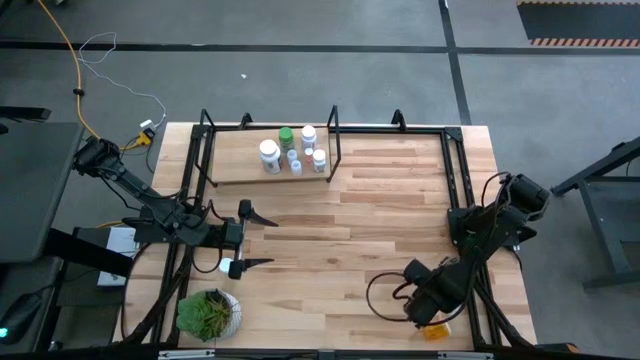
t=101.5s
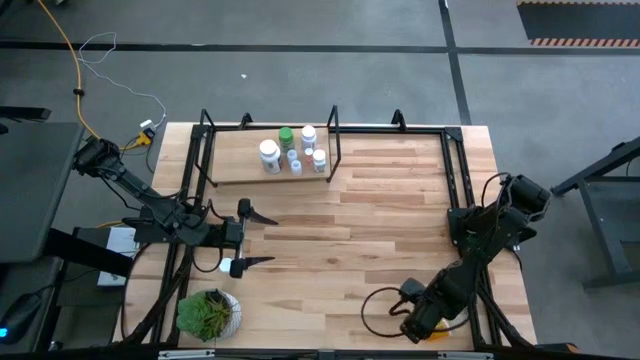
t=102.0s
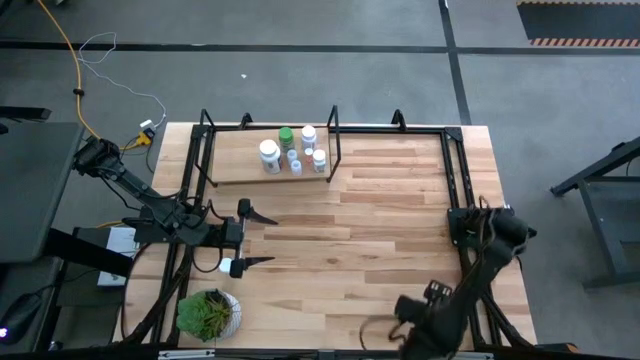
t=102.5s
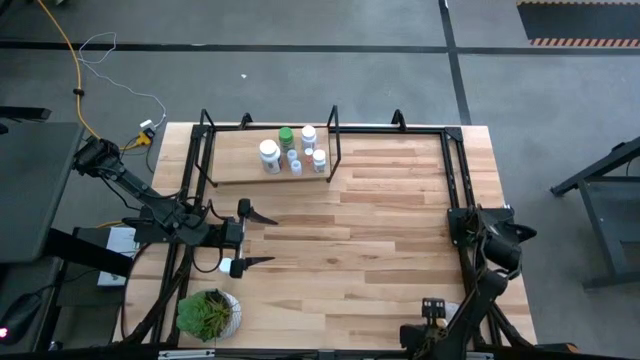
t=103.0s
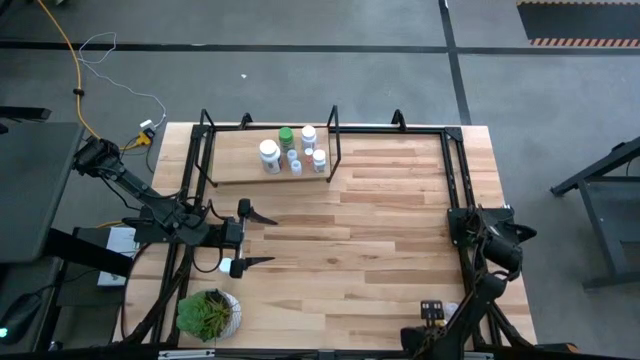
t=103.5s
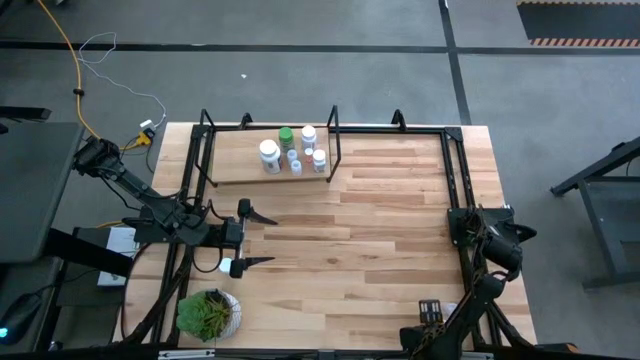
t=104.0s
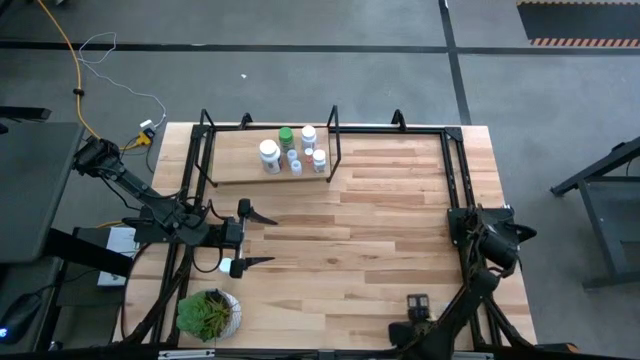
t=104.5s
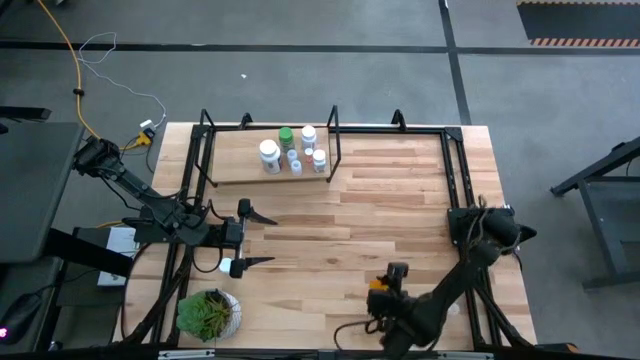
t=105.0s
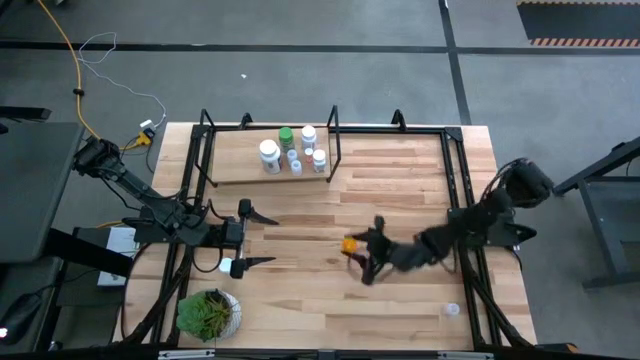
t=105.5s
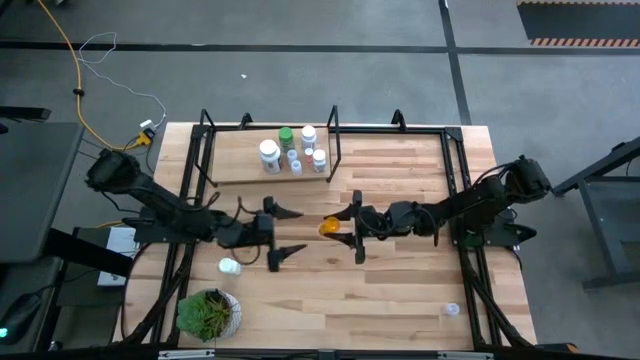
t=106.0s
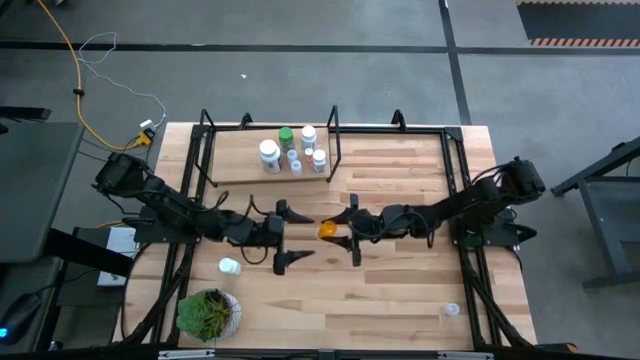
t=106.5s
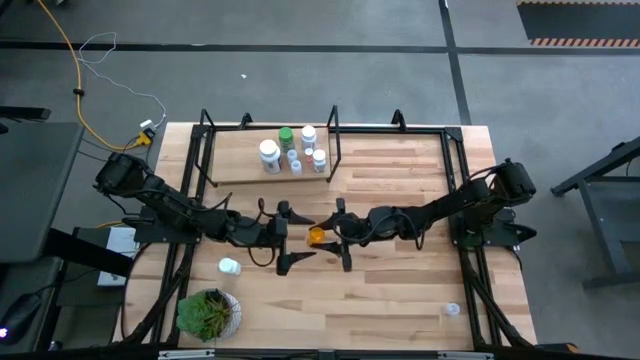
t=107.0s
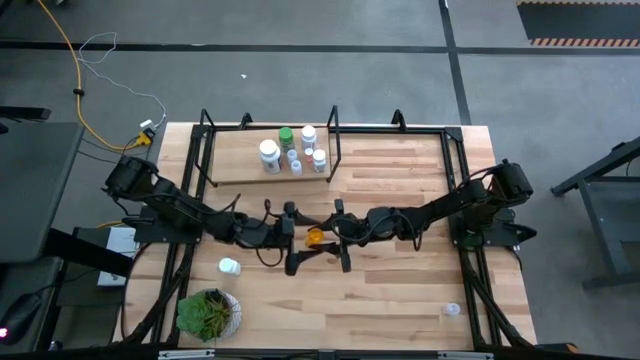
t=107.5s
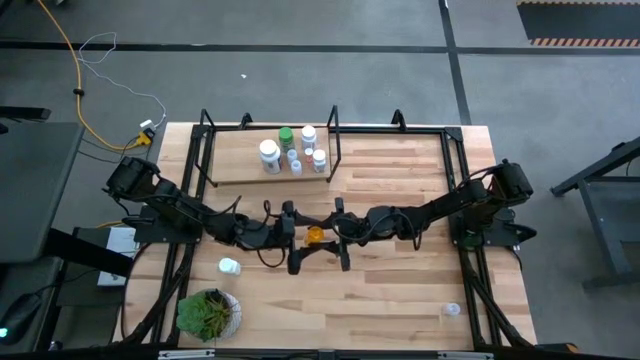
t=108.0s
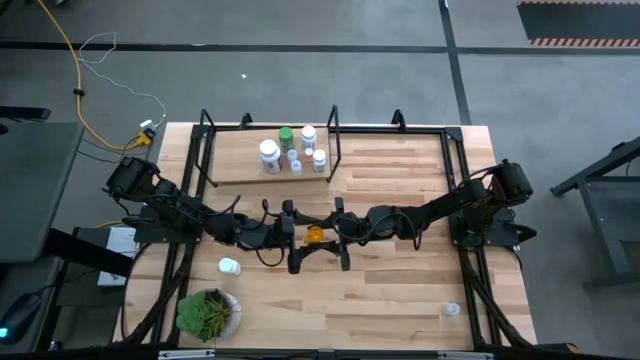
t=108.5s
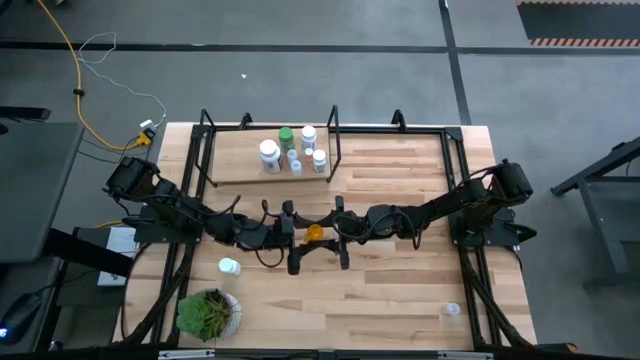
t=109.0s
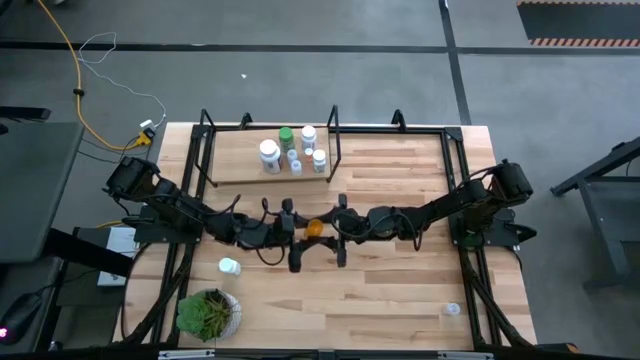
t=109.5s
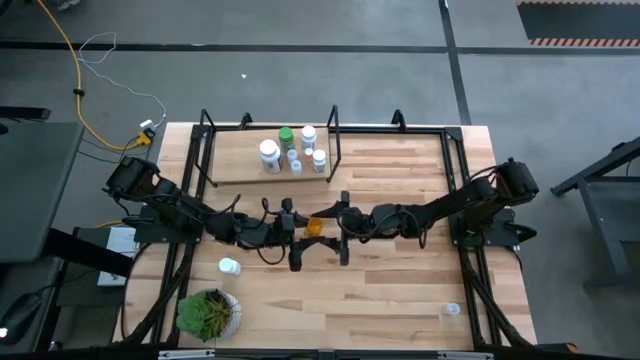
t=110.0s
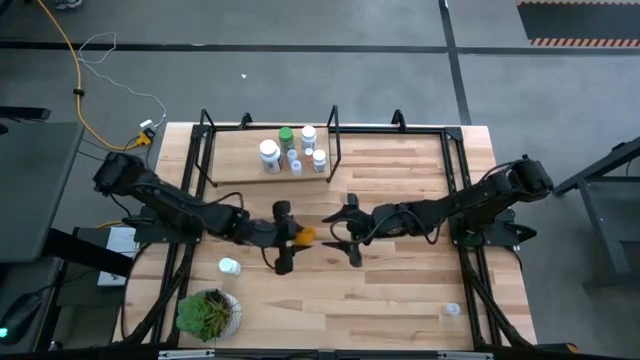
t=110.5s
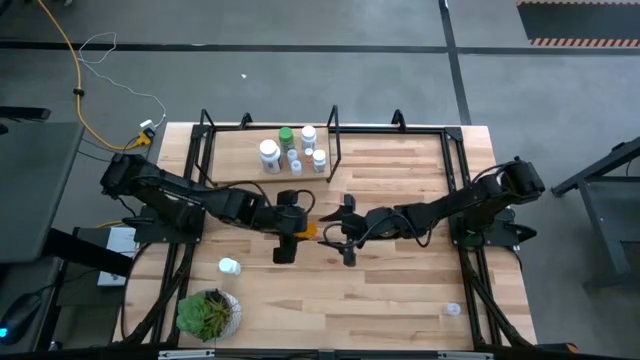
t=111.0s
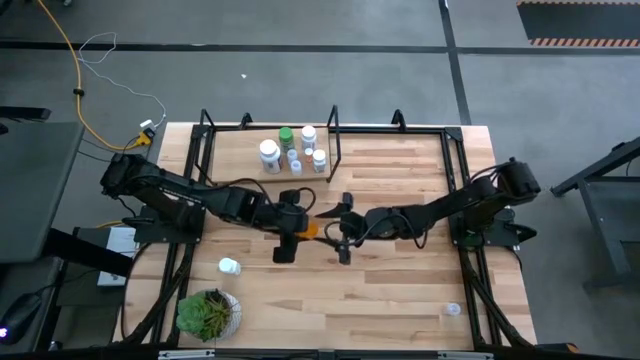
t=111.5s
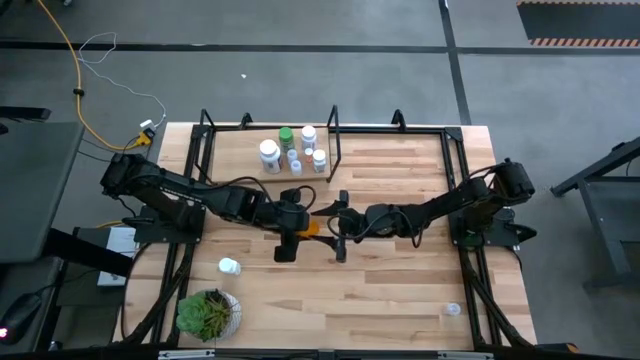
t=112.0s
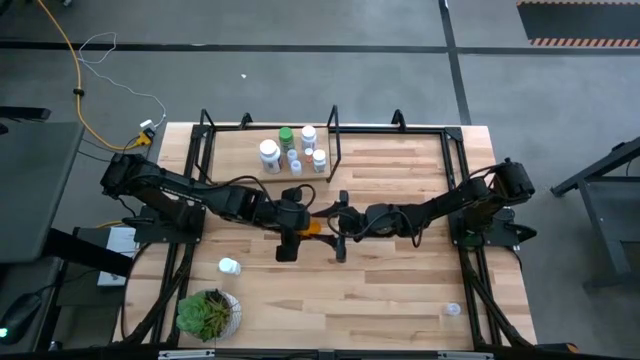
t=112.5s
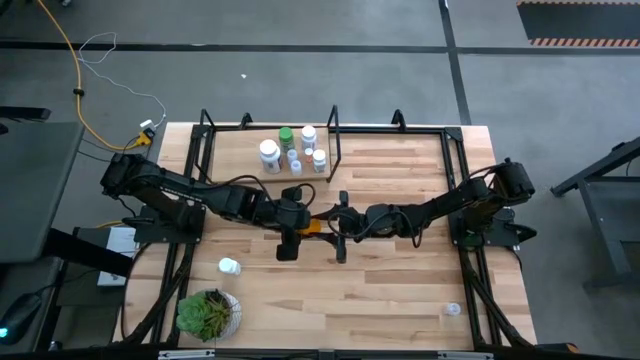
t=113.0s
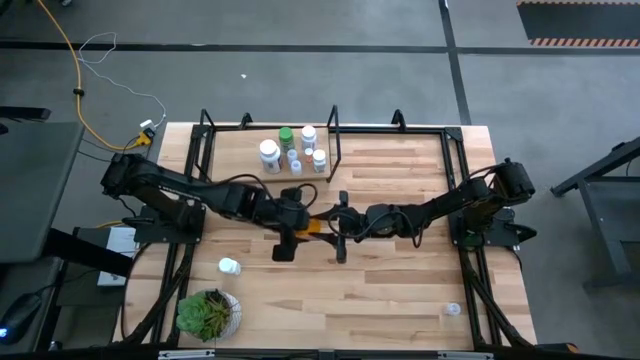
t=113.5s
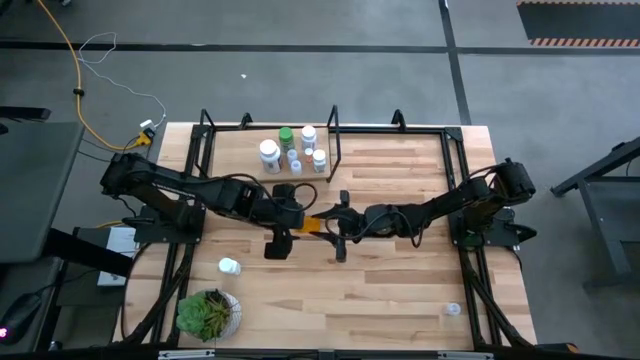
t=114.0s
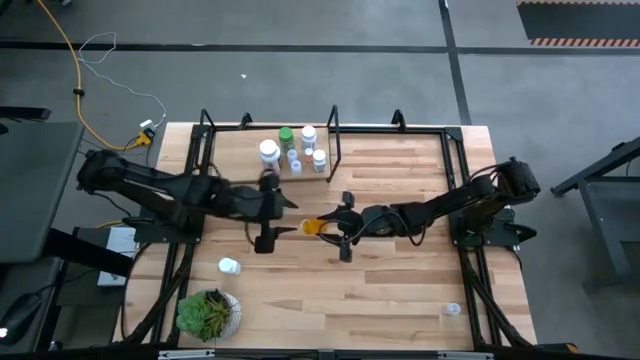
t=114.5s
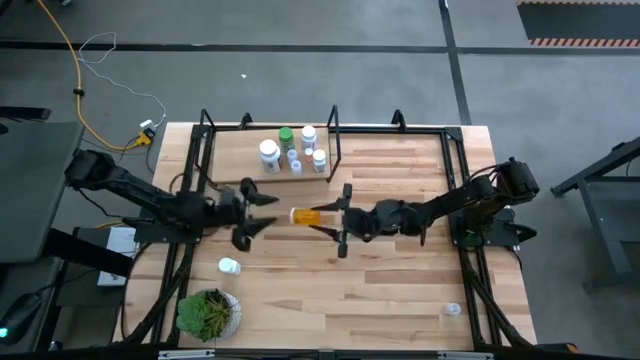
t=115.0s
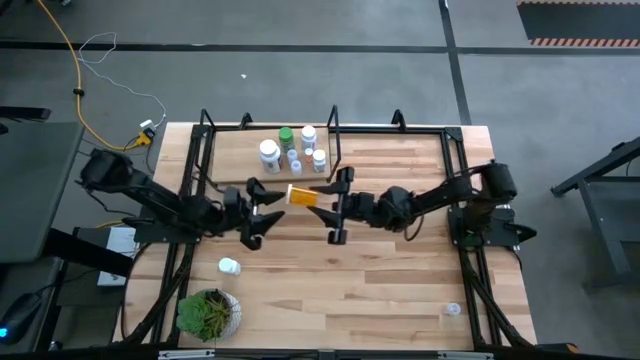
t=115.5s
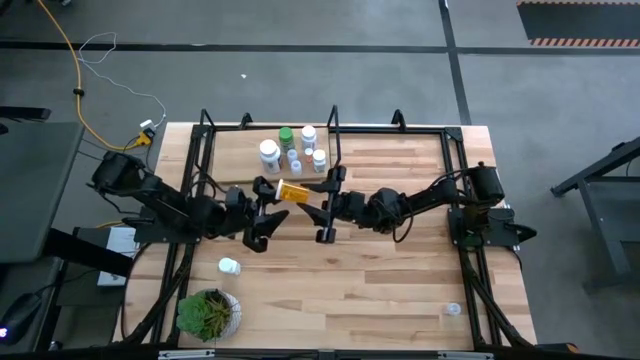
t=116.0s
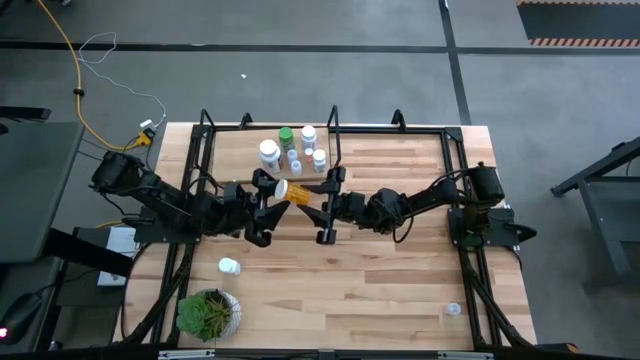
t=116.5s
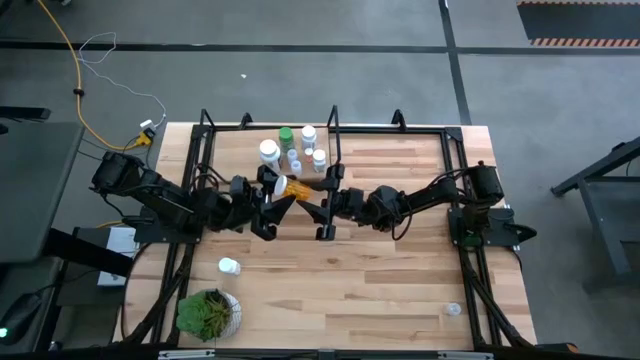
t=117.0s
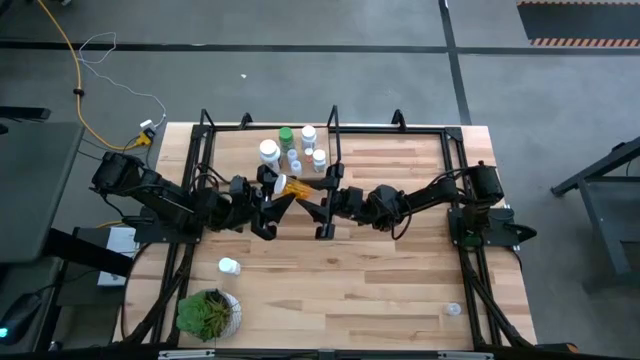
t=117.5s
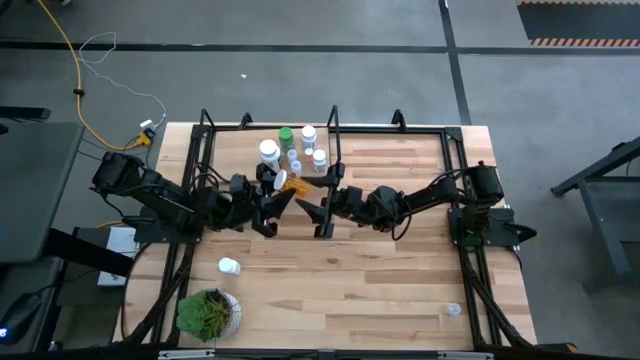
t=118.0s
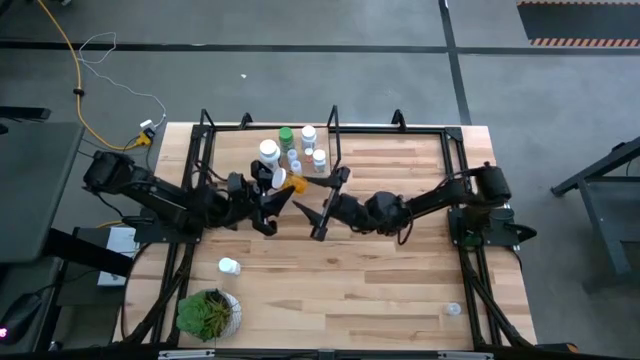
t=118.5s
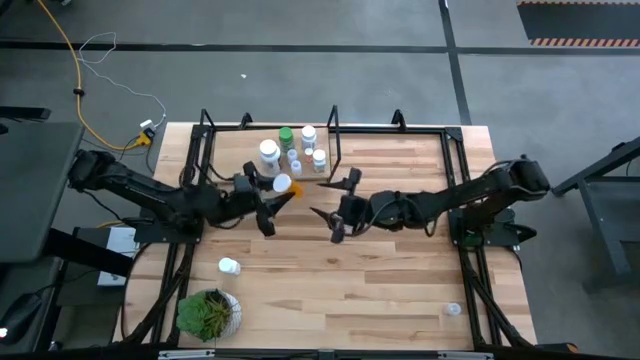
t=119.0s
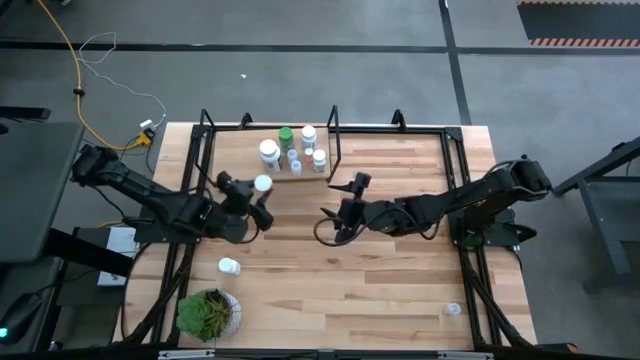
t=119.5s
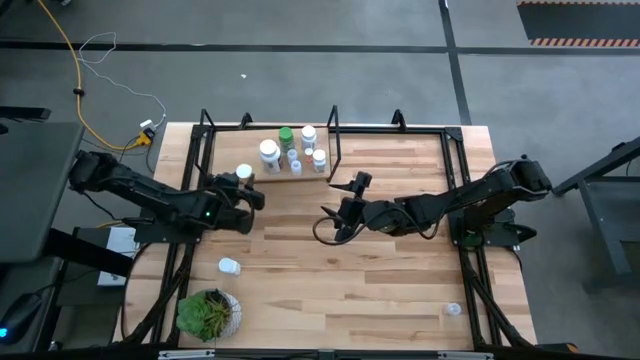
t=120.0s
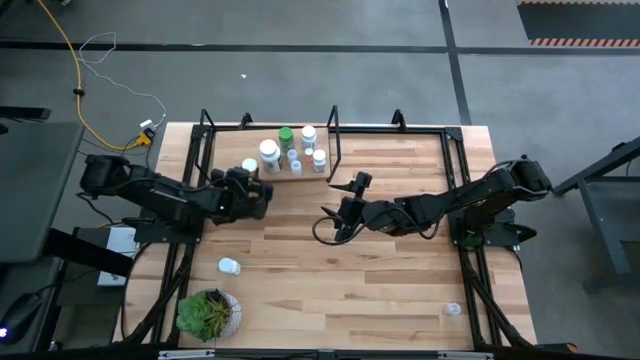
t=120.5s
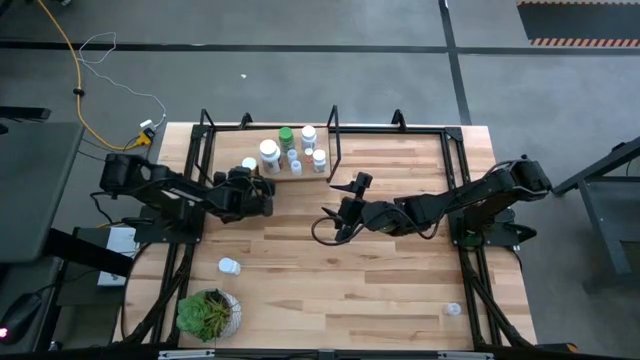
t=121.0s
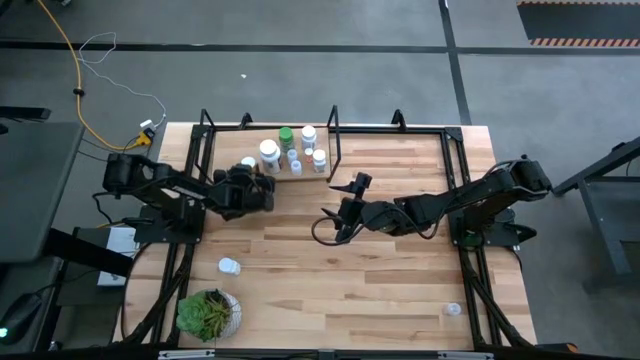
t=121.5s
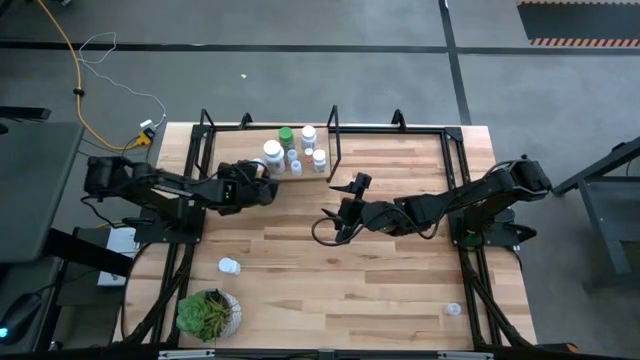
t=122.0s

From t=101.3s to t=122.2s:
Task: Pick and place medicine bottles onto shelf by color
Put the orange pill bottle on the shelf
